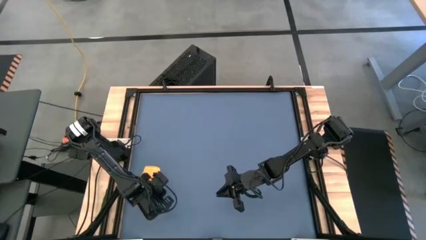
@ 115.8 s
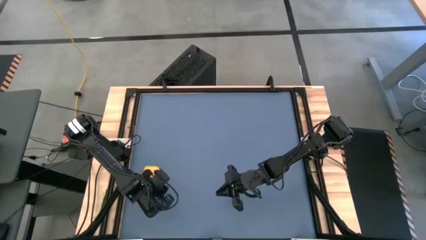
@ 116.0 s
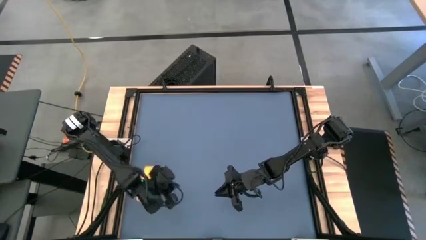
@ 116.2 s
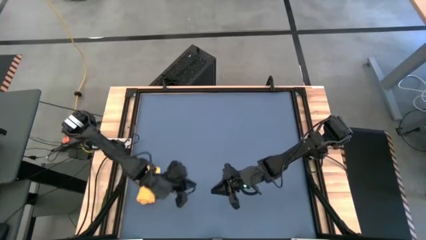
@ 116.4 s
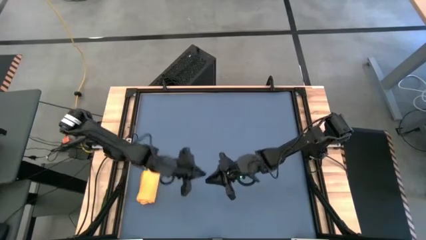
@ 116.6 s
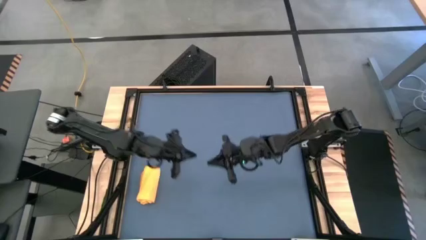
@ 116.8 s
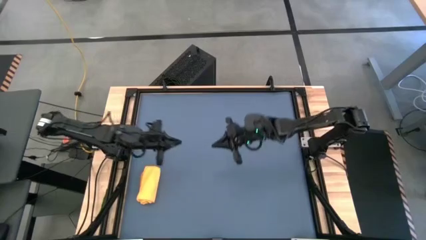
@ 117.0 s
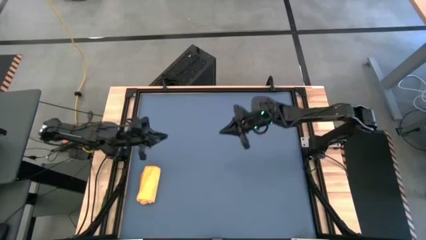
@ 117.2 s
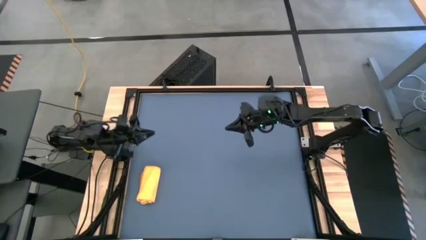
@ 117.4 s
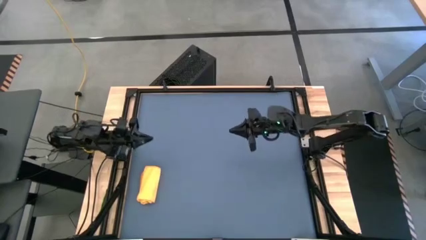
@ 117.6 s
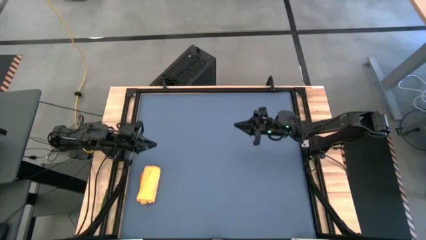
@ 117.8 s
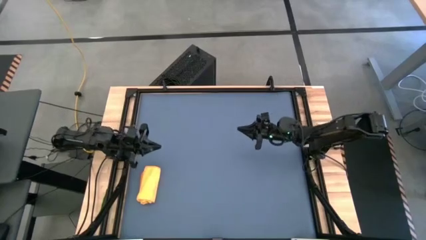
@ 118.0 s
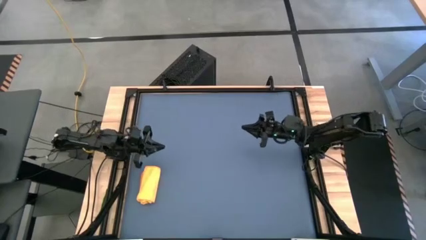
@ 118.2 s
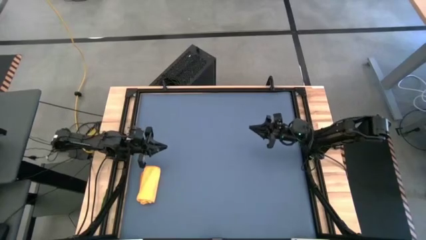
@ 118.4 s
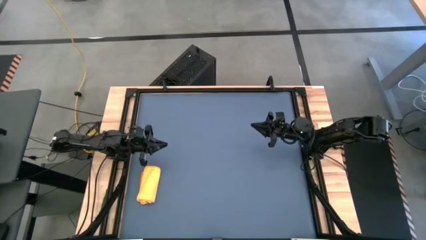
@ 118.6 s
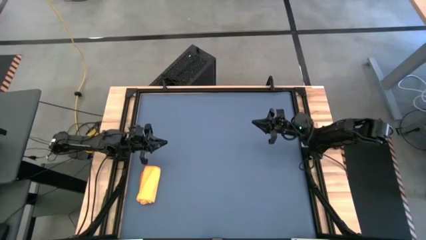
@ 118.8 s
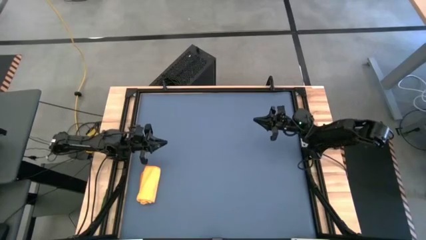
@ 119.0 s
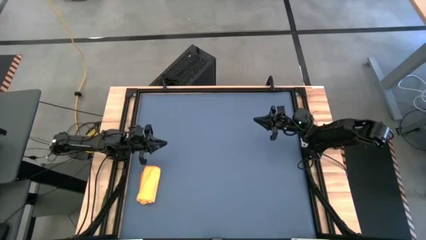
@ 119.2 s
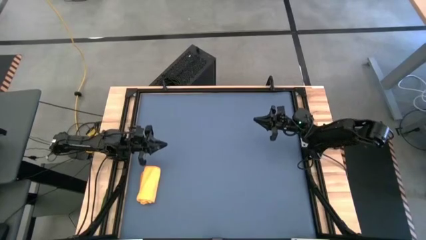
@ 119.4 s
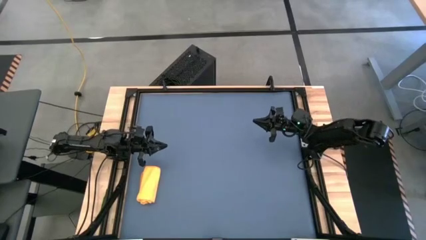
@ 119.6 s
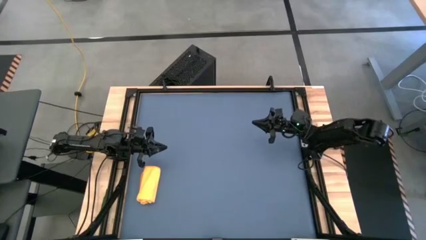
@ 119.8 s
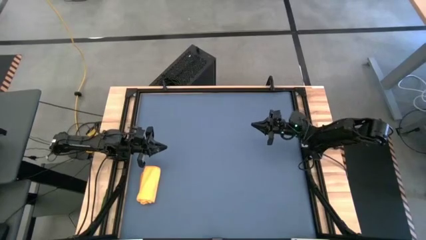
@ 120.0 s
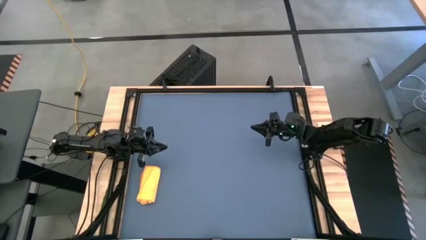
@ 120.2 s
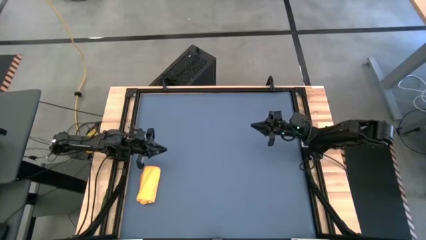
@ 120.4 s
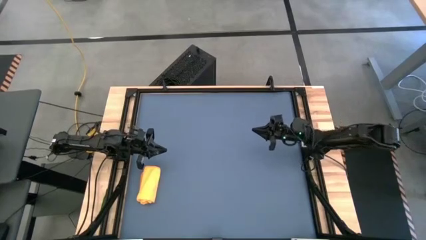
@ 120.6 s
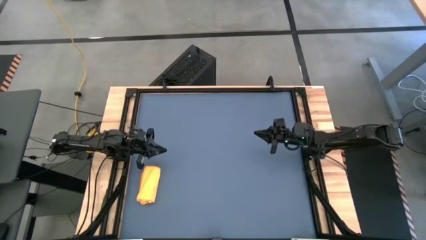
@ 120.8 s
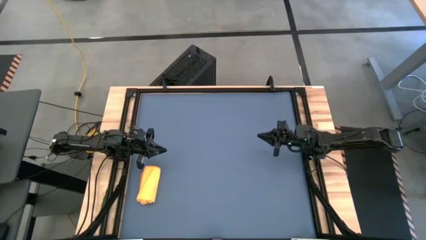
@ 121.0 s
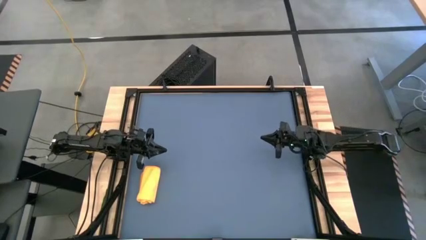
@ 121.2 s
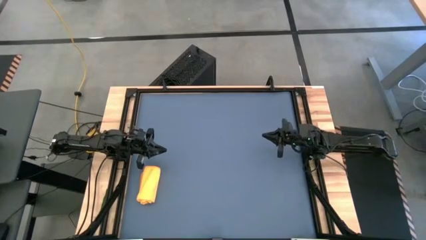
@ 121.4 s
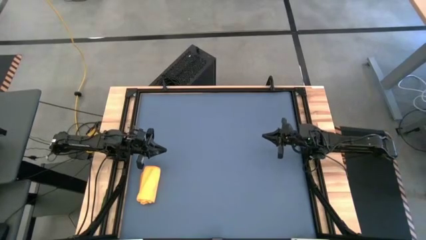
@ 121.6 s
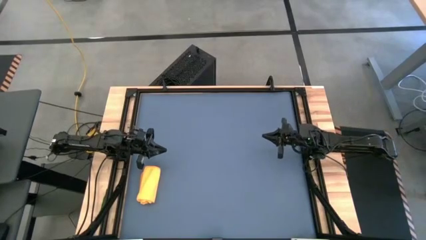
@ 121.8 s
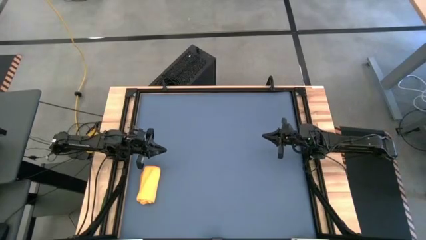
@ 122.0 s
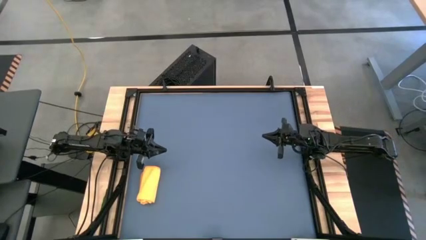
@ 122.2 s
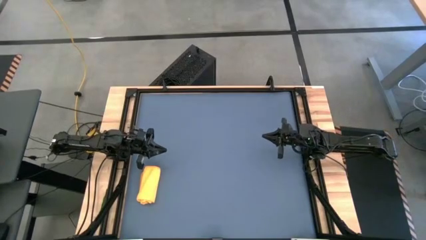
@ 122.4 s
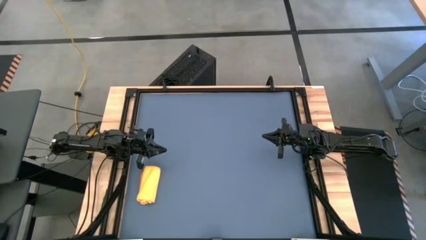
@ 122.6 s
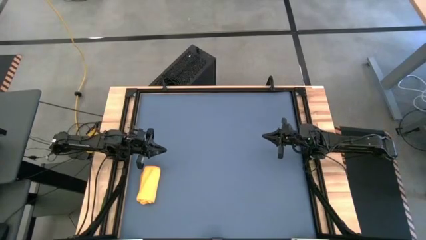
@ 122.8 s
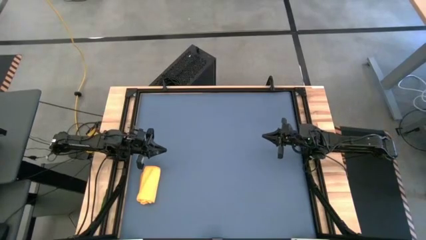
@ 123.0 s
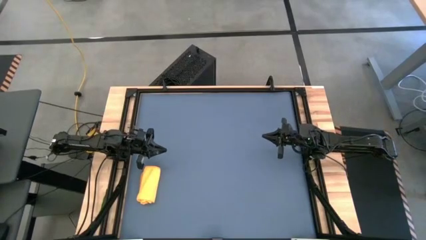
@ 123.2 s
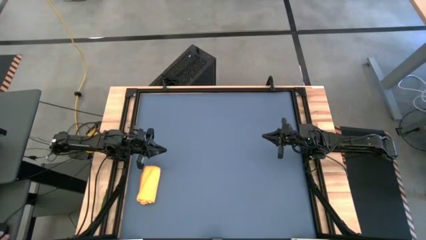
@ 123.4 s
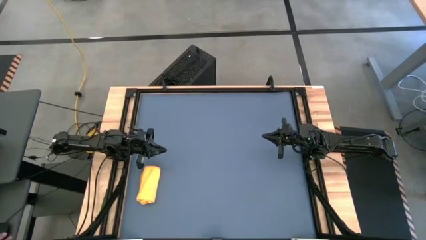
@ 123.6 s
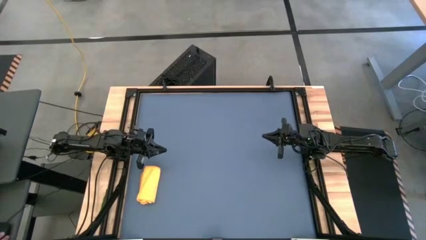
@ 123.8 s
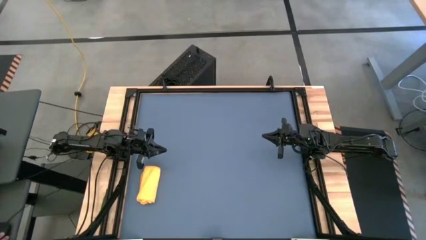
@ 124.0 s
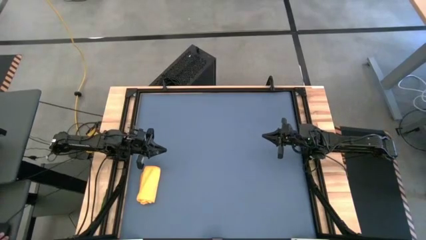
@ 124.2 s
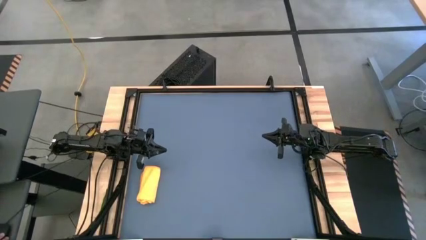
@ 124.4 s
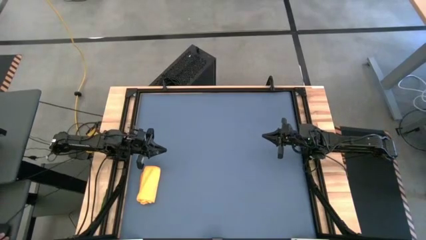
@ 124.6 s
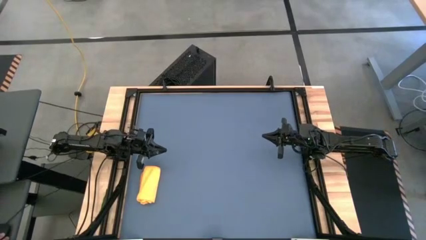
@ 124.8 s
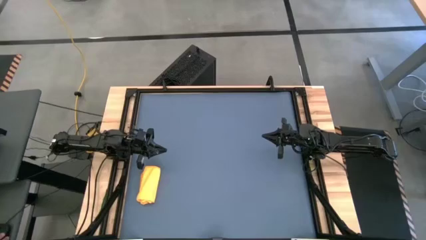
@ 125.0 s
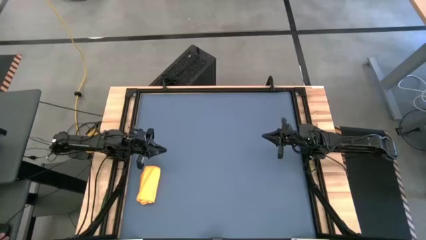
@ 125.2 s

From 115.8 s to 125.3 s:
Task: Roll towel
Return to Home Position

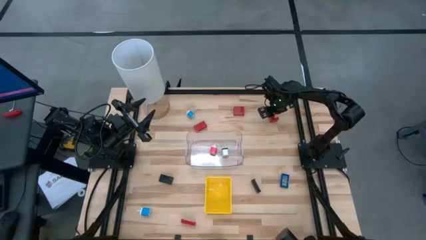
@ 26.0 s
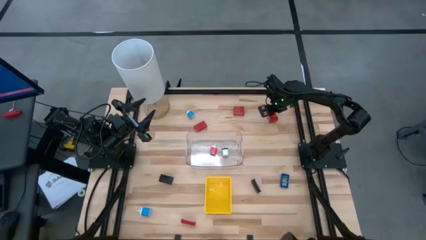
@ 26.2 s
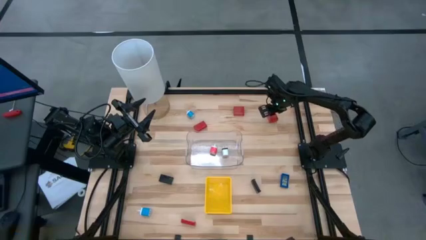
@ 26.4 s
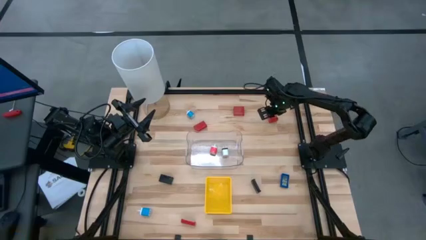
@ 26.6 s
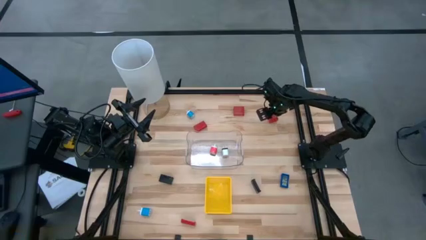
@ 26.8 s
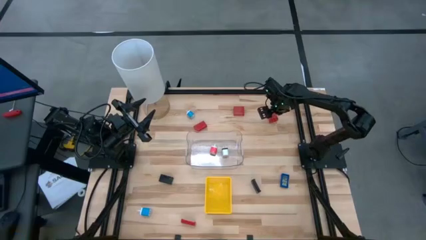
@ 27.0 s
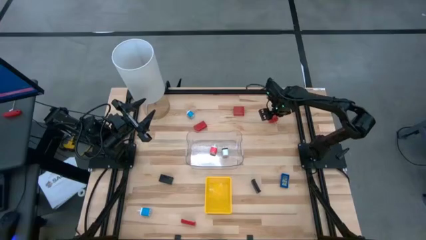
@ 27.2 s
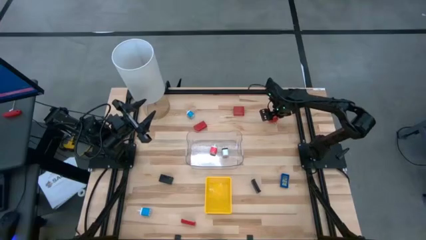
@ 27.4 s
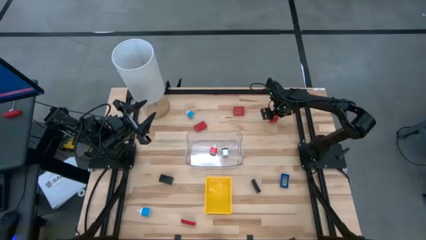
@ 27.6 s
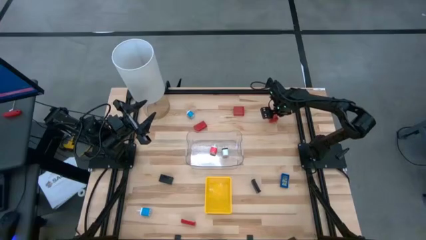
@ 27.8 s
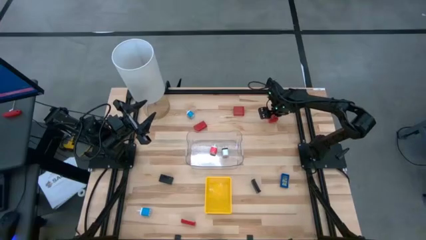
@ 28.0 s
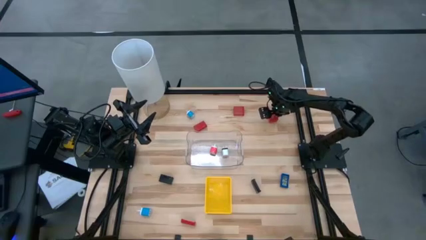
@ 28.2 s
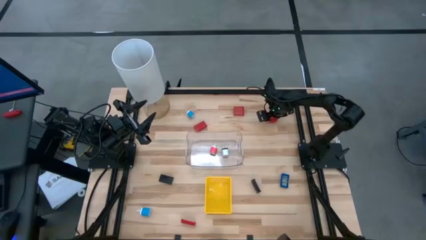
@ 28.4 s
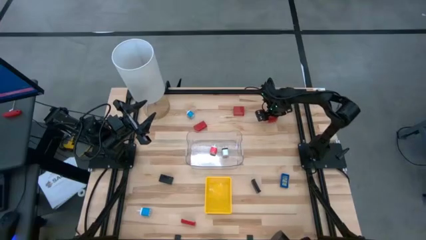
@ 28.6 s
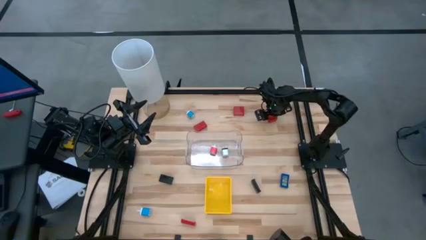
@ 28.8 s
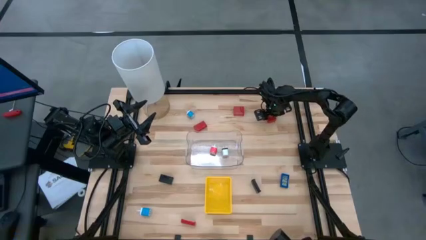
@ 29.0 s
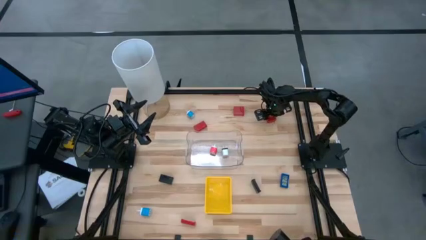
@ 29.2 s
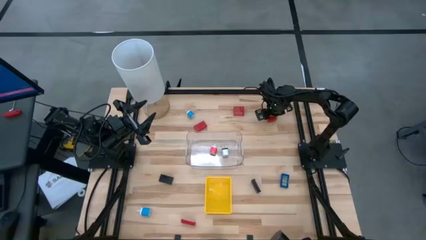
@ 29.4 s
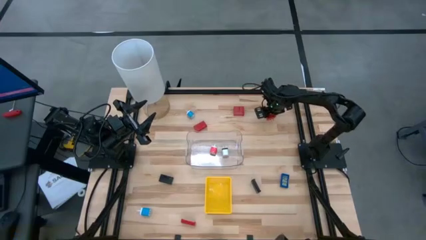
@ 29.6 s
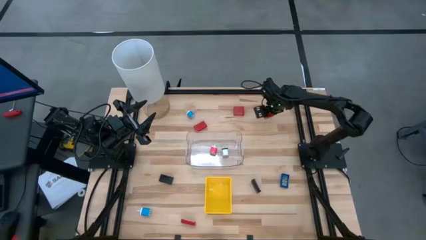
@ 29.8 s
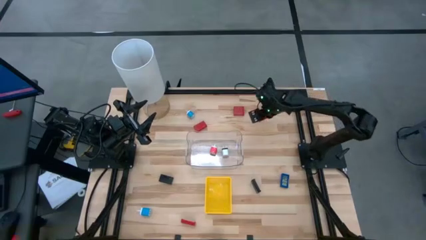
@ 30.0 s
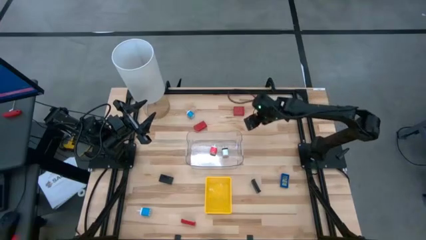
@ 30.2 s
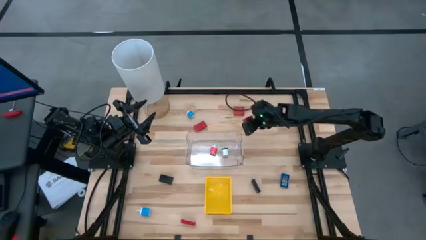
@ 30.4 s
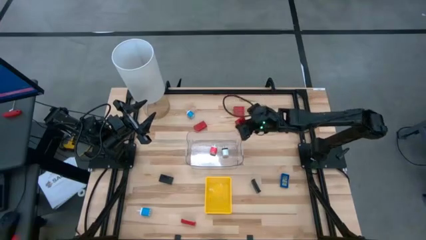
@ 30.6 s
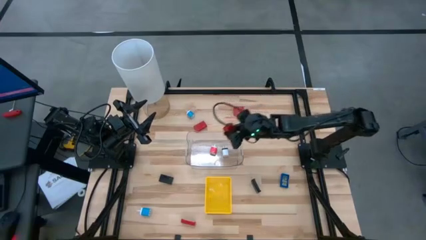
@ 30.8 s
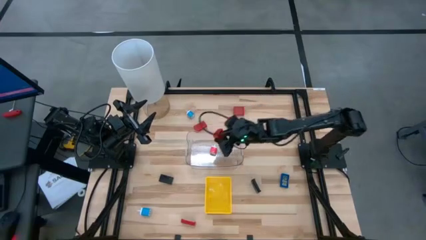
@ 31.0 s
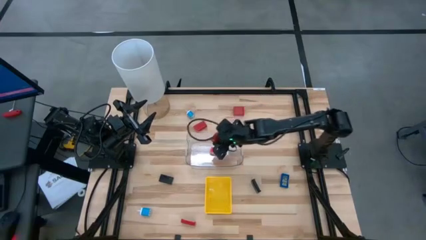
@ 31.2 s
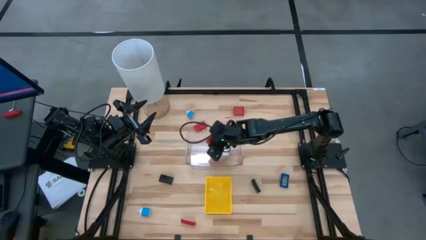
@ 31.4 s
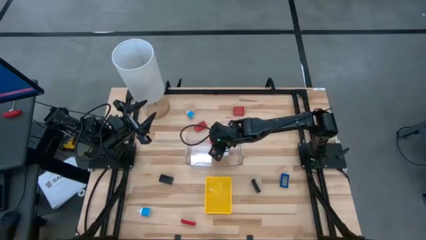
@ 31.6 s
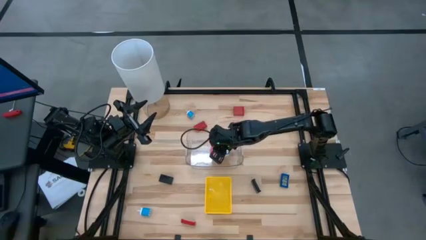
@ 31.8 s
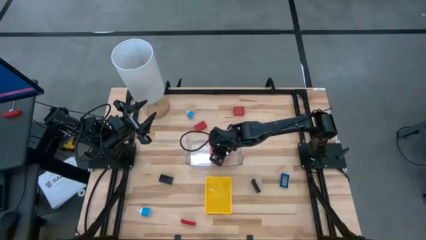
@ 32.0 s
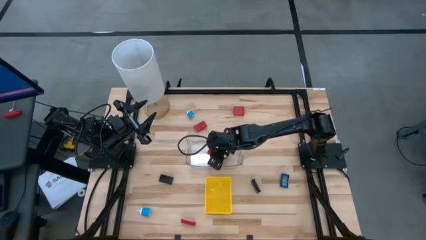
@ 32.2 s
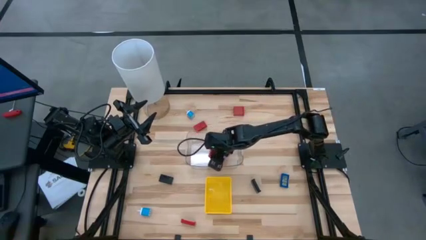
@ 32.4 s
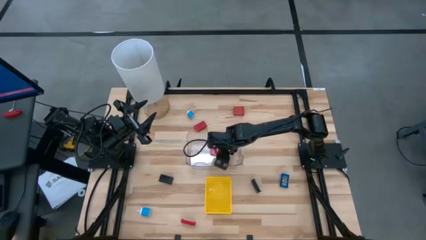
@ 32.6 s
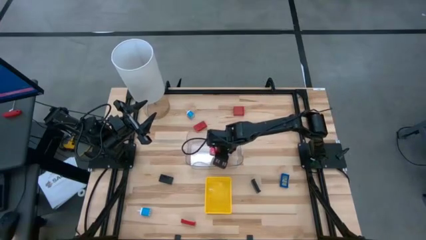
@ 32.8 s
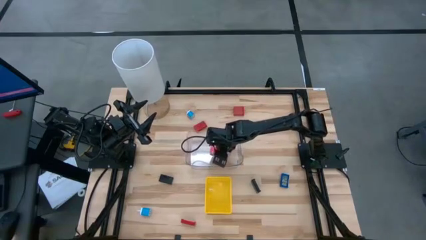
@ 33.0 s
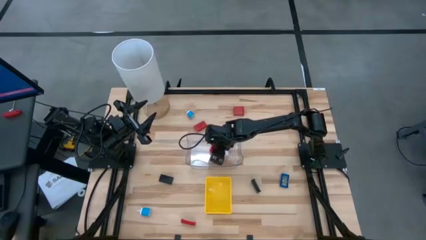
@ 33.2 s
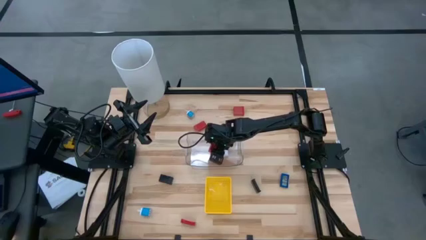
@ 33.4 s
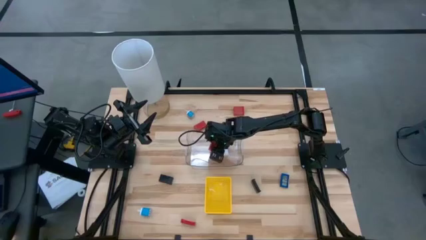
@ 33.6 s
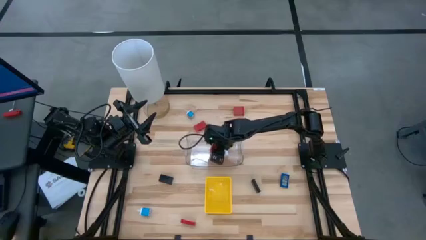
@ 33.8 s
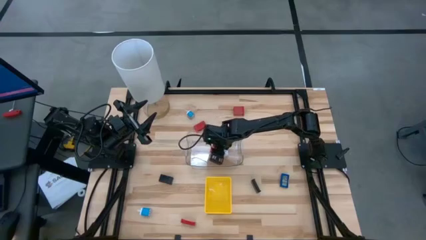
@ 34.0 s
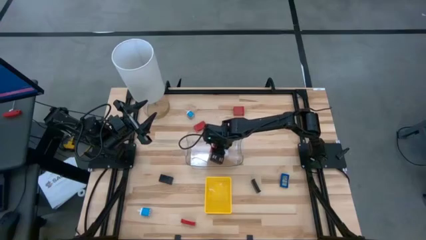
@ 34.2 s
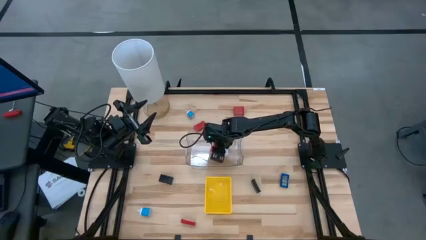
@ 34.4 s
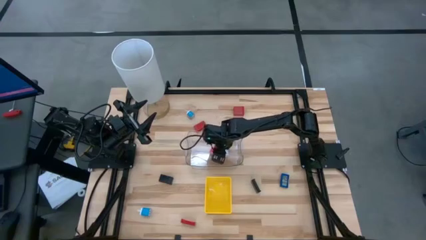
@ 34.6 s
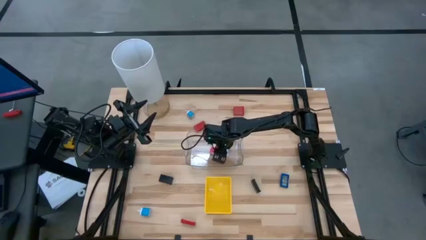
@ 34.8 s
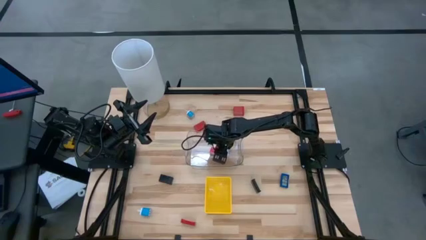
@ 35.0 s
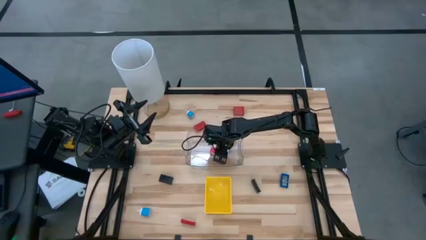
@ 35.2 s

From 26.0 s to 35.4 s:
Task: Pick & Place Office items
Put the right red charger adapter into the transparent bin
